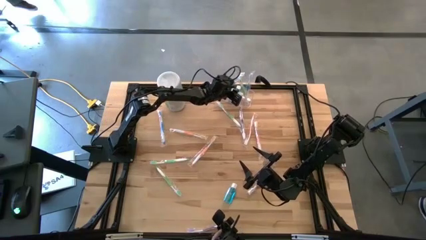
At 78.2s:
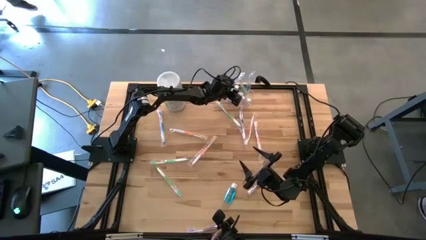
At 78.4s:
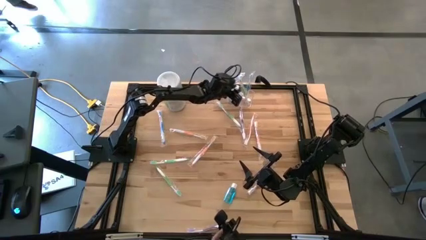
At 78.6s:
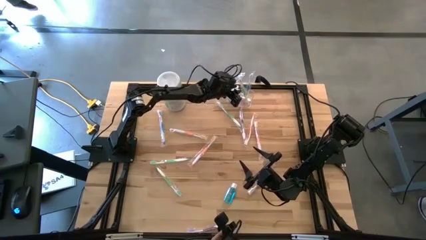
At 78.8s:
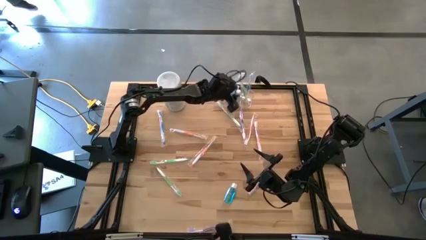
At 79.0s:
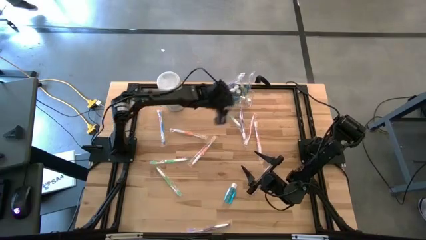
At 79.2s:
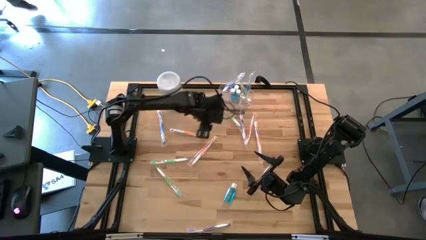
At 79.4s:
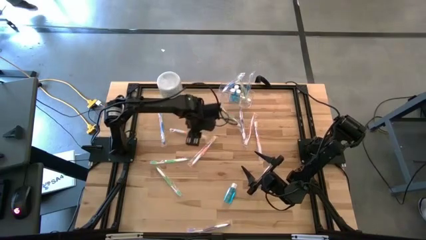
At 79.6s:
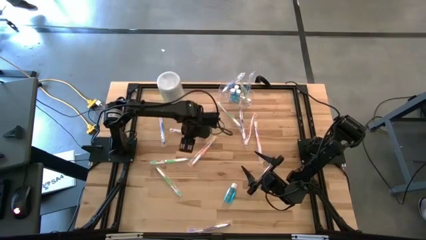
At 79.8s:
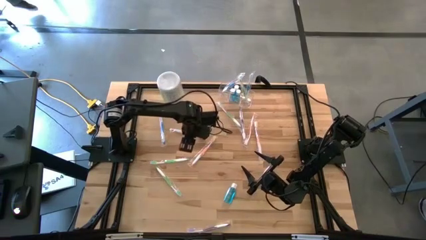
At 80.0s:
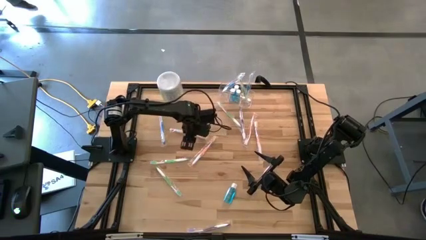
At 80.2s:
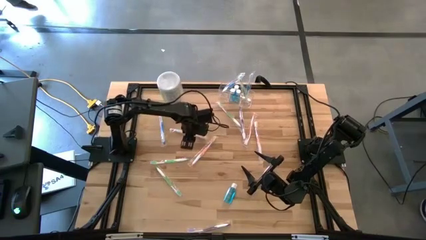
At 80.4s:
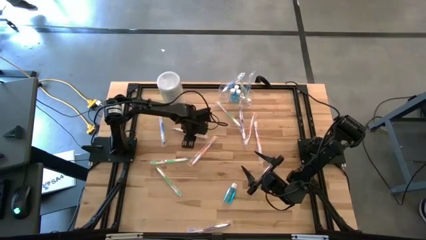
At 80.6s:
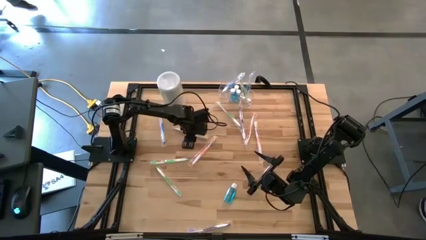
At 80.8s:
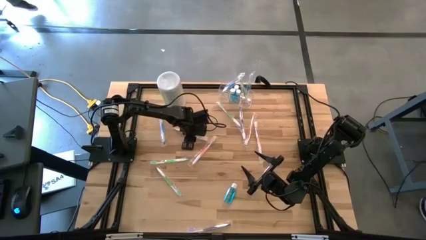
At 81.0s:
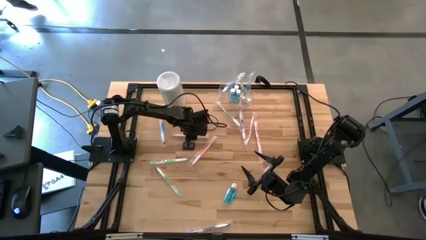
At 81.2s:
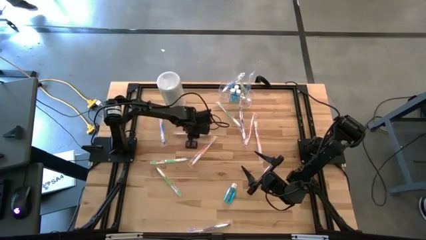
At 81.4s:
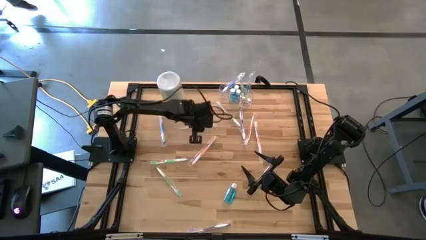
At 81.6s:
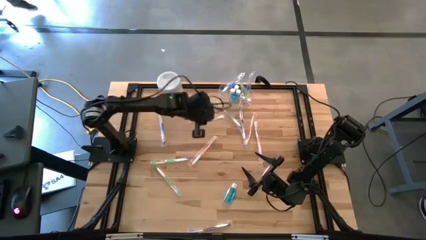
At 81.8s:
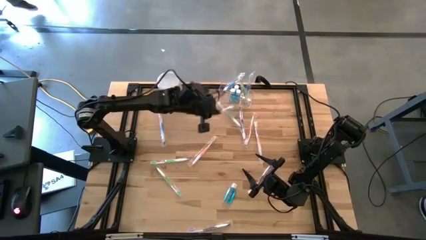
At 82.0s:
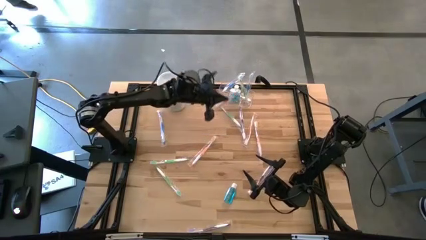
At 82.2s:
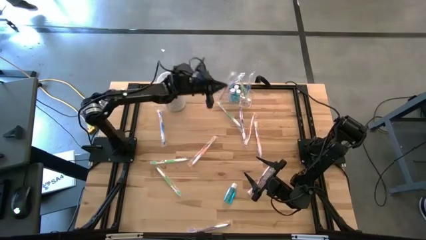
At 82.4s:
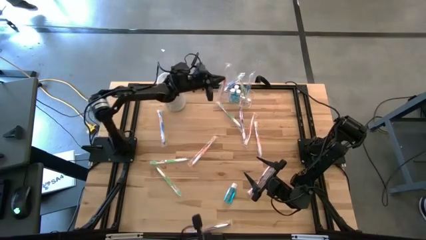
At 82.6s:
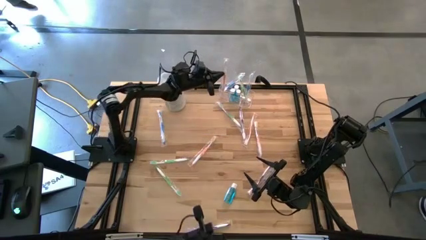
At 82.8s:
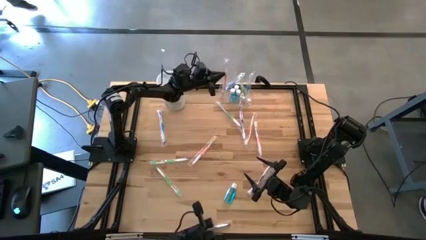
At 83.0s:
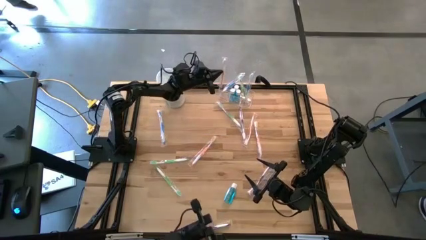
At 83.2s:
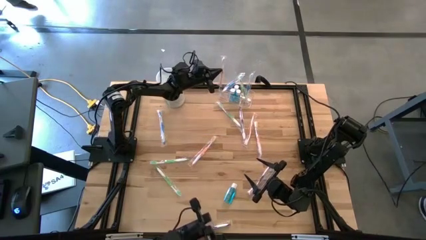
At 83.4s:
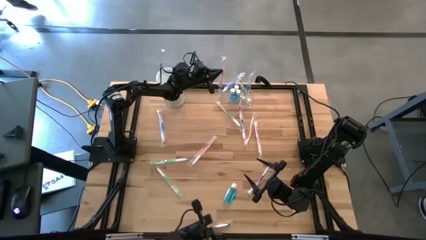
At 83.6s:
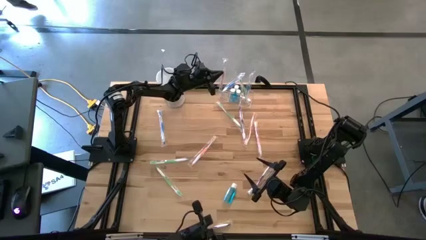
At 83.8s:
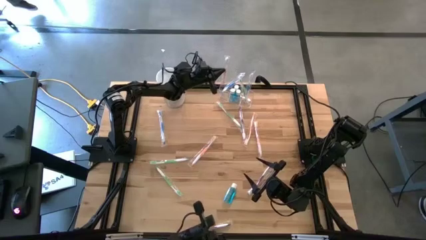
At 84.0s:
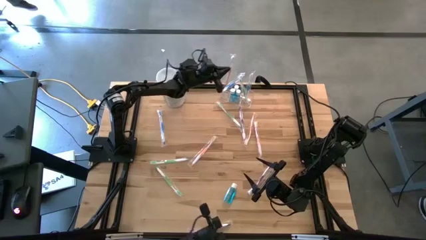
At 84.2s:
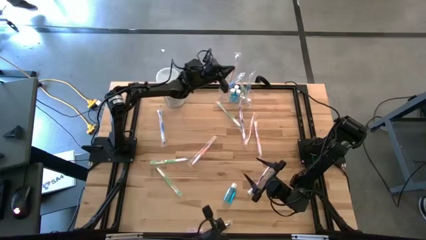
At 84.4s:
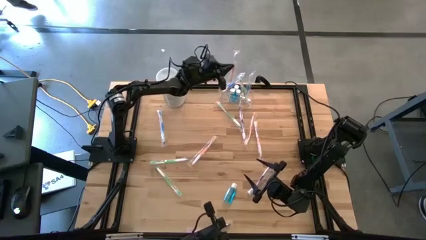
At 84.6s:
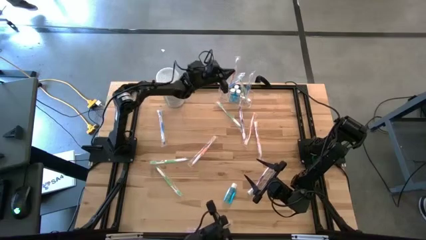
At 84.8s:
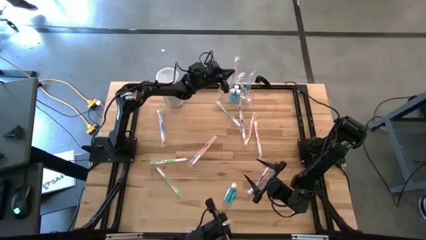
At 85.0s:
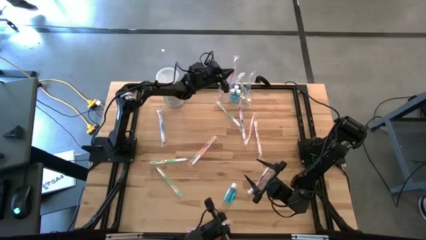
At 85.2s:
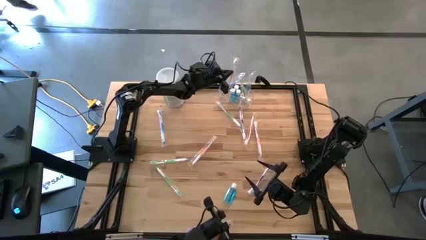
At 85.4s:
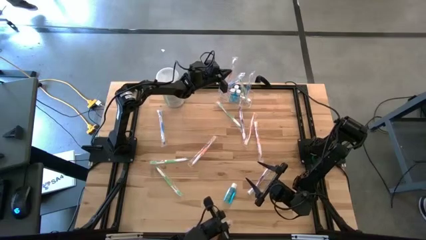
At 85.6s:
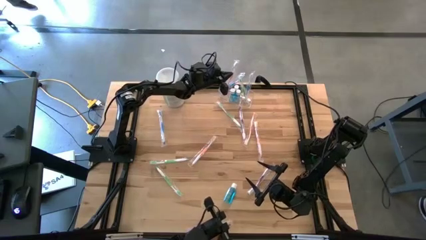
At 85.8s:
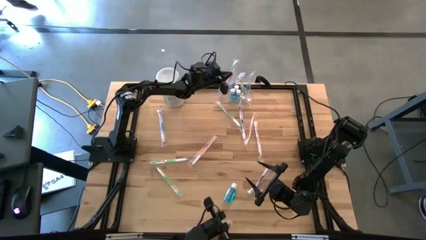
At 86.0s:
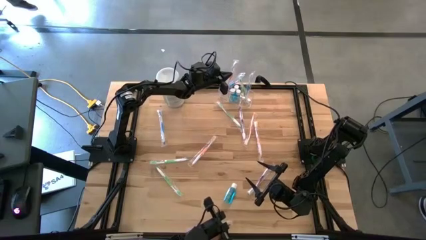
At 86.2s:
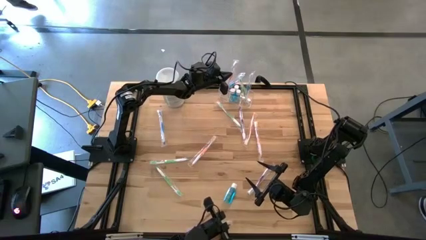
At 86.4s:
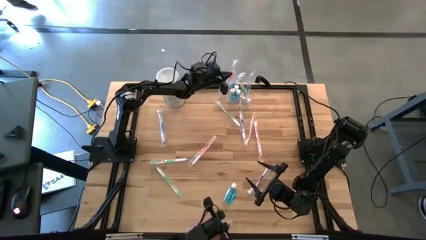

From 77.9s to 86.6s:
Task: Pick & Place toothbrushing station
Put the orange toothbrush into the transparent organizer

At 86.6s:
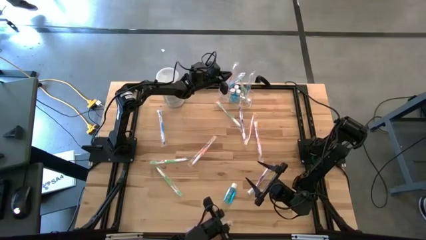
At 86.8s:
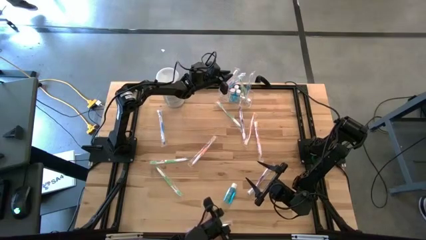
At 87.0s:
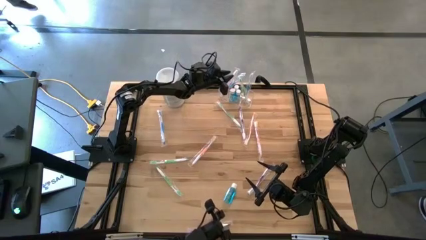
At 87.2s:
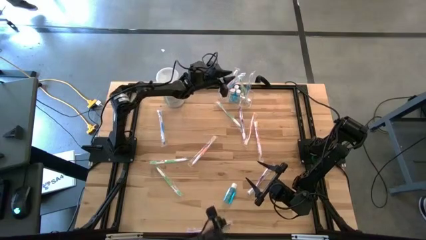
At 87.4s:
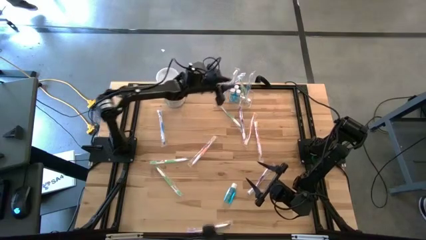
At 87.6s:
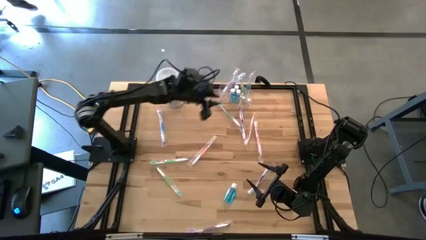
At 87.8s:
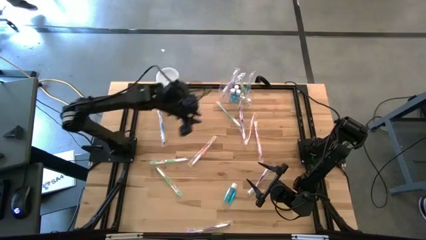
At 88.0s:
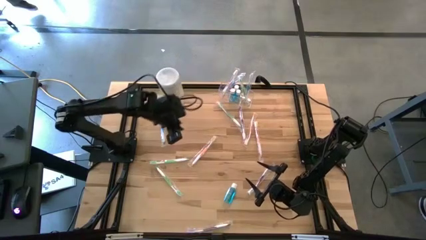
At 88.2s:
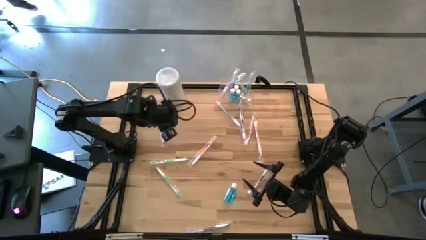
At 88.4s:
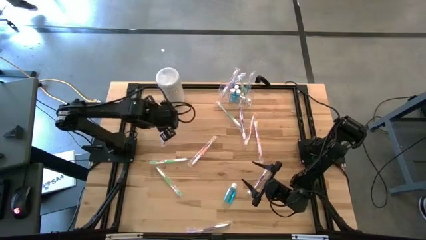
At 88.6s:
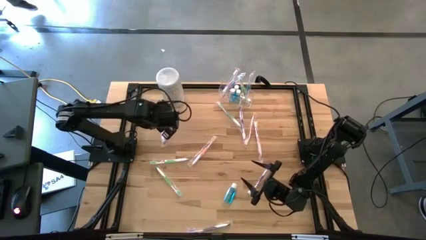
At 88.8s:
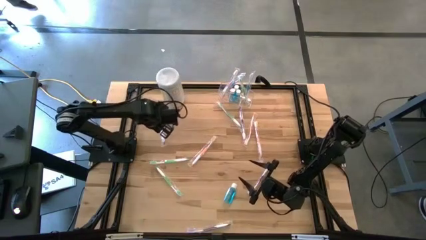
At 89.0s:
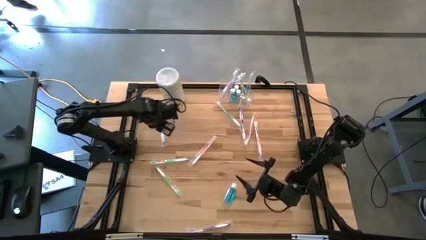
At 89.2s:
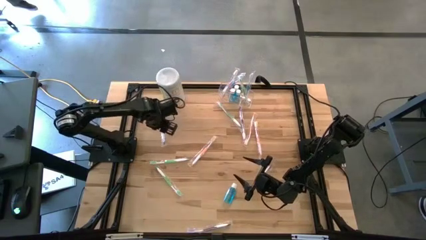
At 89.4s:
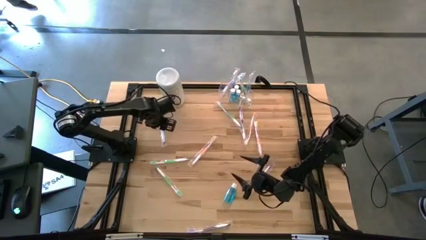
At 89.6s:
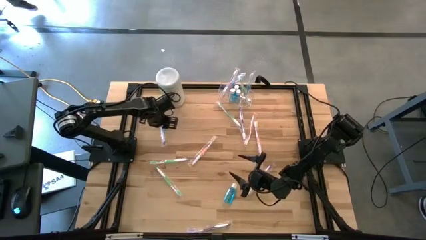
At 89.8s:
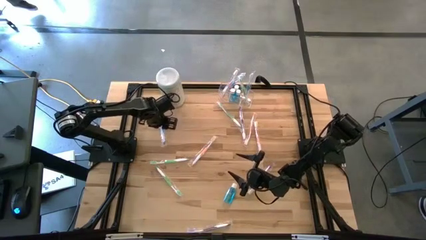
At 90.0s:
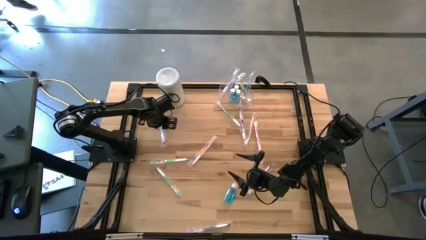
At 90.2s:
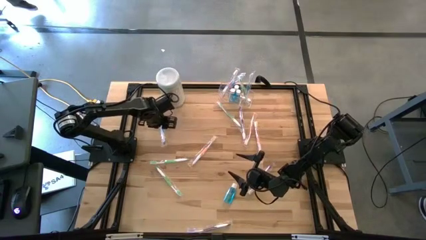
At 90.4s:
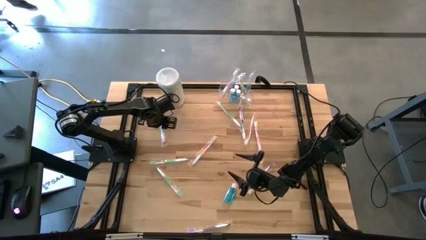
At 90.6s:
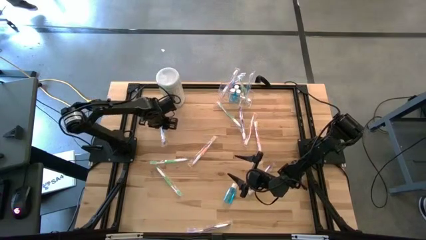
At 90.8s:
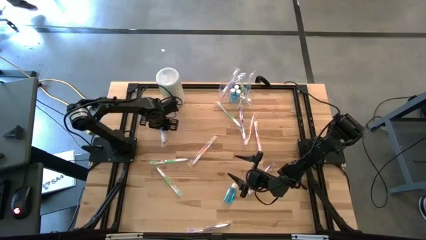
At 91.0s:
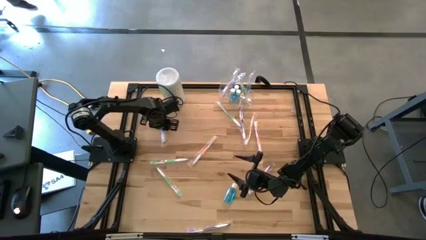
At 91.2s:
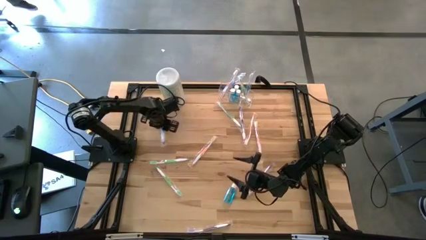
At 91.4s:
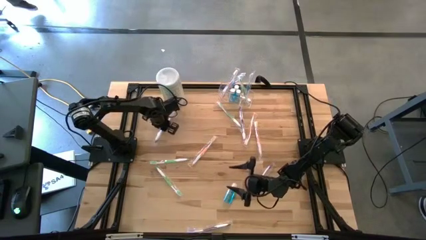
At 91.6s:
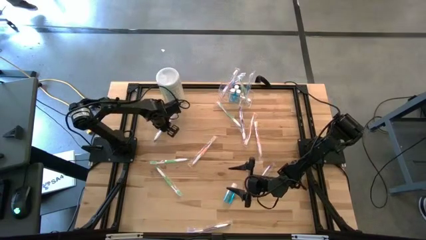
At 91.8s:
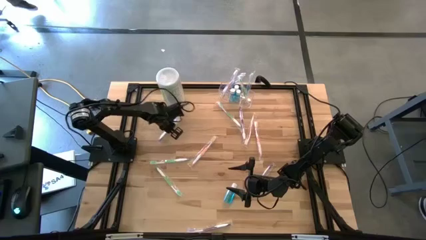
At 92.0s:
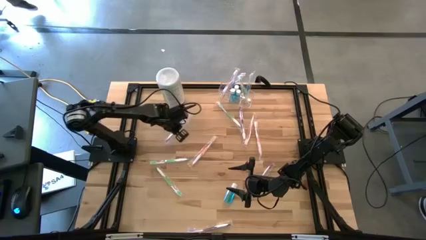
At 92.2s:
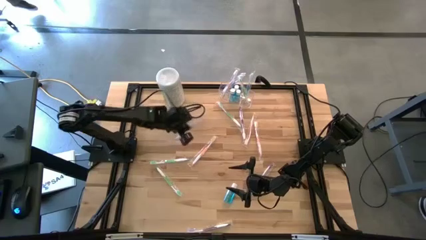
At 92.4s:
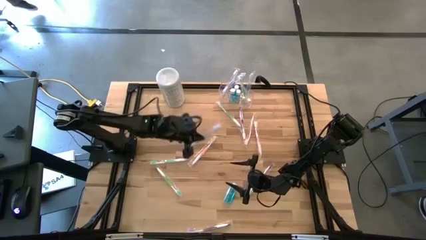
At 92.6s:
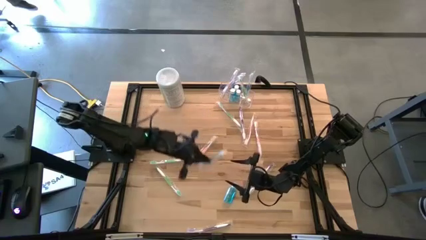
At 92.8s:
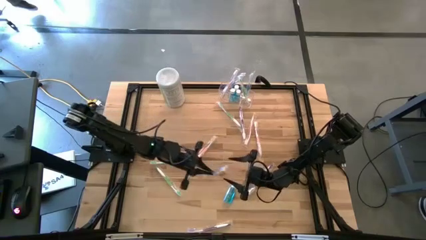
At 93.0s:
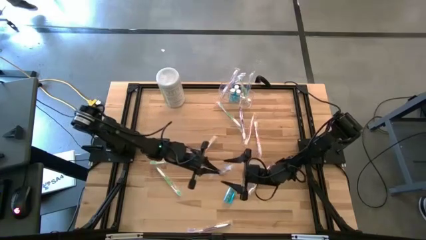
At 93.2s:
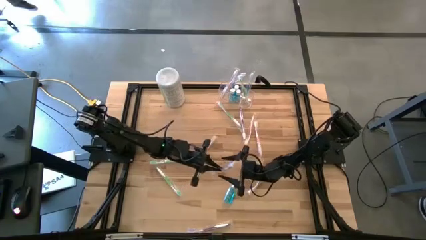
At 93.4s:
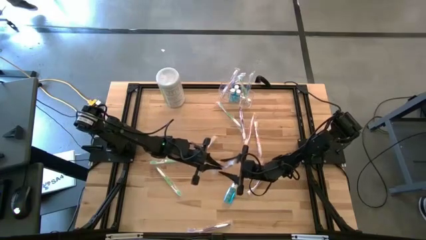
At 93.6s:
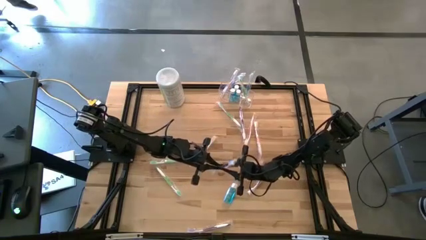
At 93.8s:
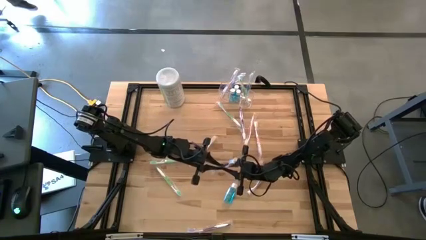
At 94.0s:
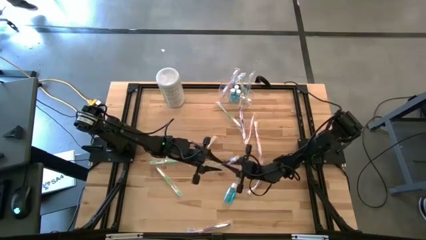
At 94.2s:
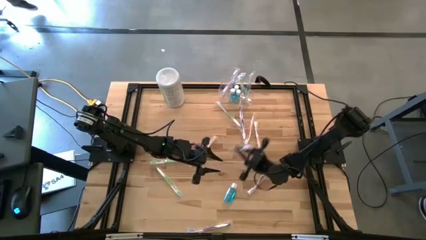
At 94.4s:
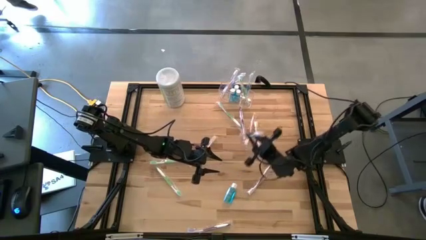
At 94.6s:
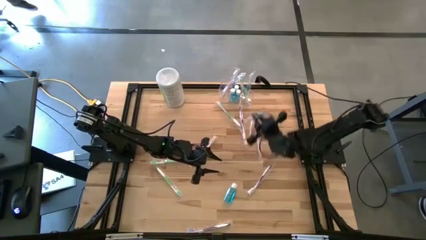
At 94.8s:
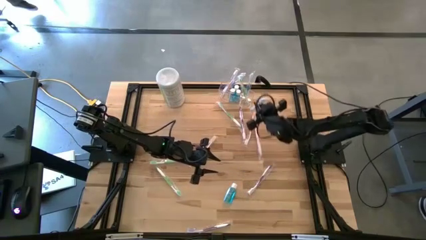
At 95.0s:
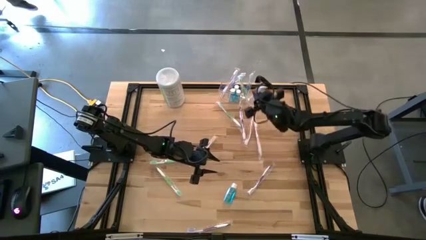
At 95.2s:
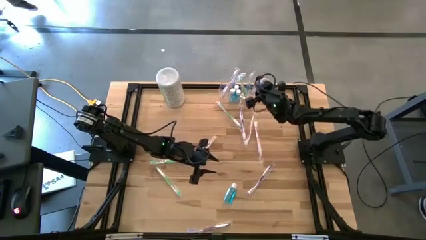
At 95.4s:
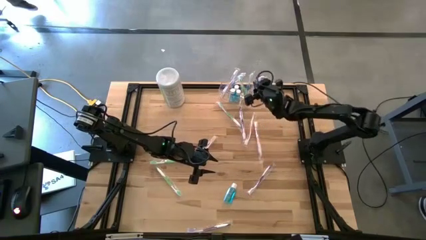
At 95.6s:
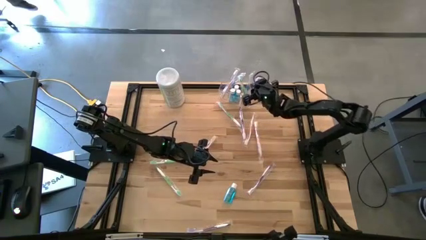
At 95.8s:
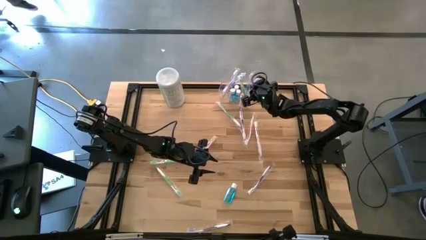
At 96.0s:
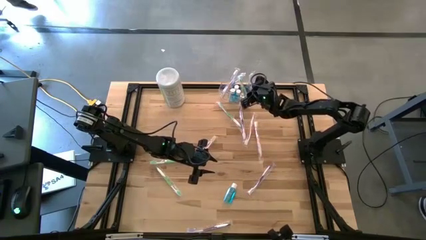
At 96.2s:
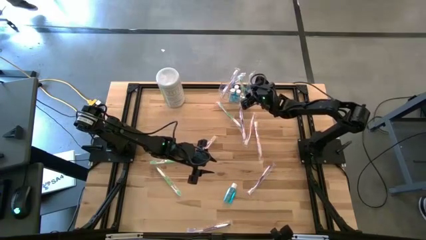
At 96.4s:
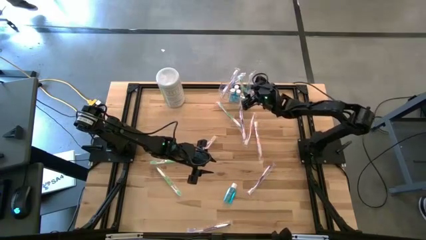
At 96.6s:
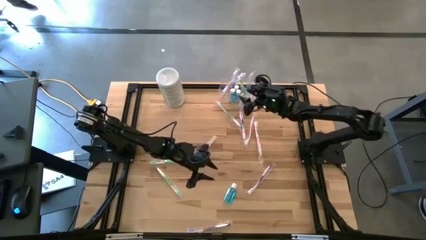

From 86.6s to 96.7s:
Put the blue toothbrush into the transparent organizer
